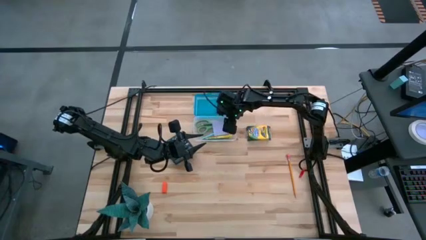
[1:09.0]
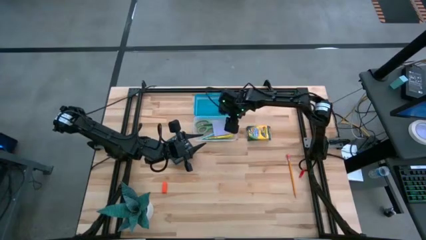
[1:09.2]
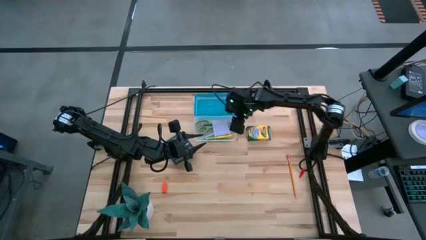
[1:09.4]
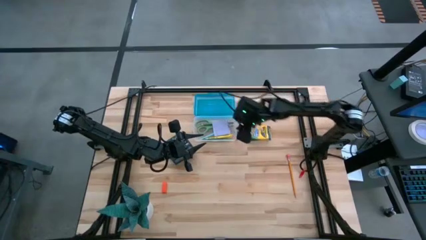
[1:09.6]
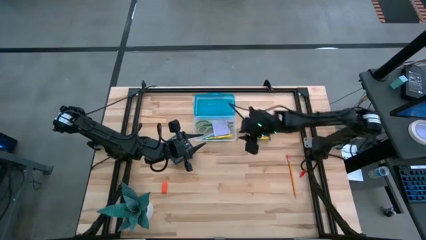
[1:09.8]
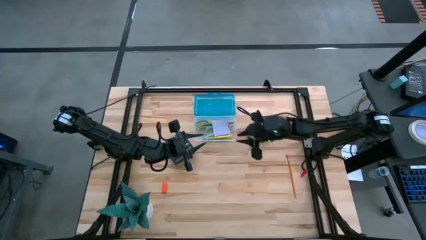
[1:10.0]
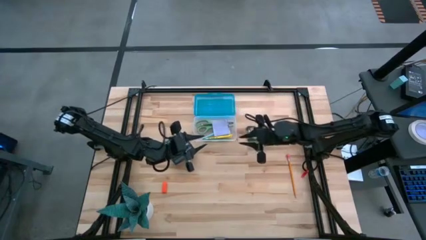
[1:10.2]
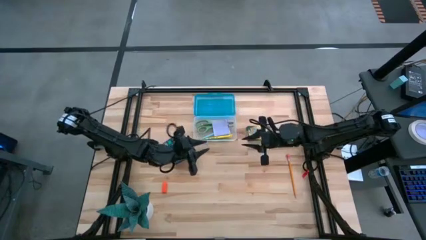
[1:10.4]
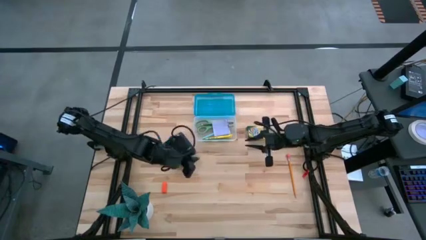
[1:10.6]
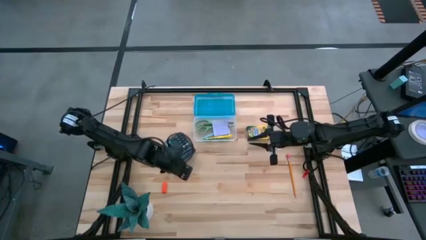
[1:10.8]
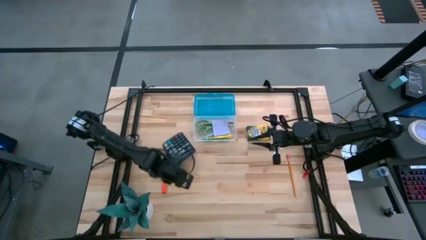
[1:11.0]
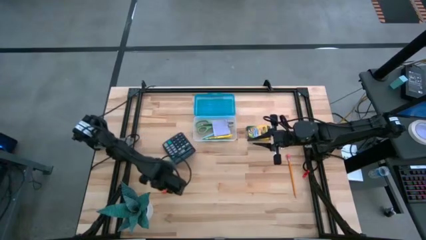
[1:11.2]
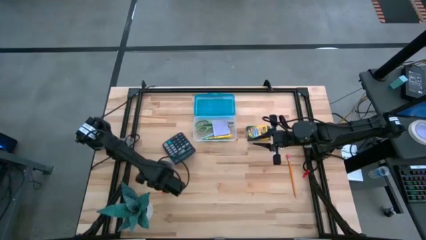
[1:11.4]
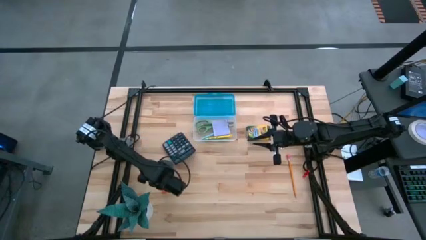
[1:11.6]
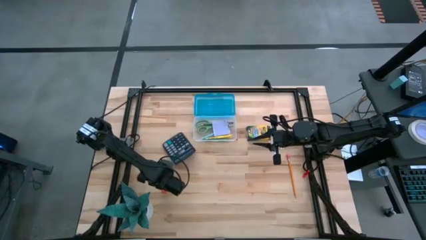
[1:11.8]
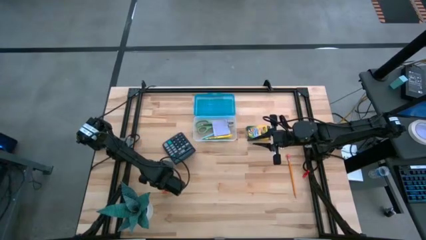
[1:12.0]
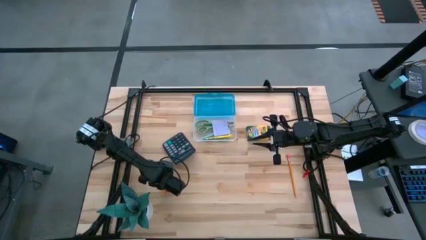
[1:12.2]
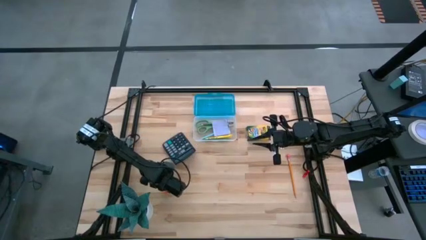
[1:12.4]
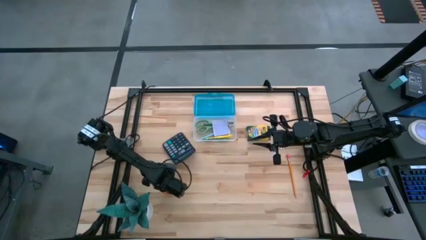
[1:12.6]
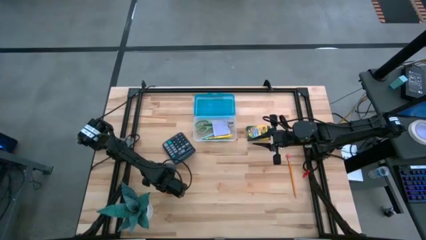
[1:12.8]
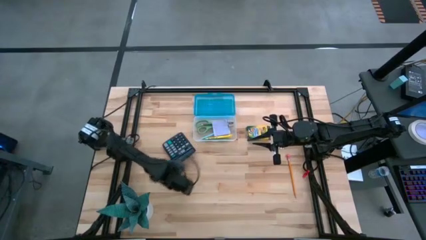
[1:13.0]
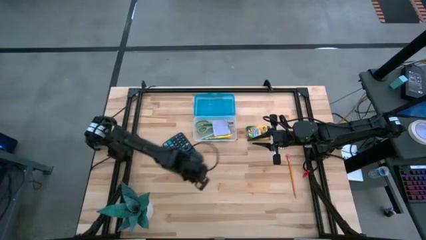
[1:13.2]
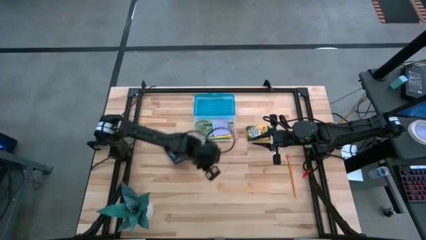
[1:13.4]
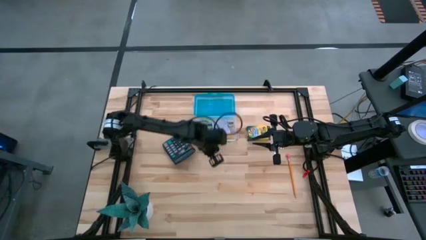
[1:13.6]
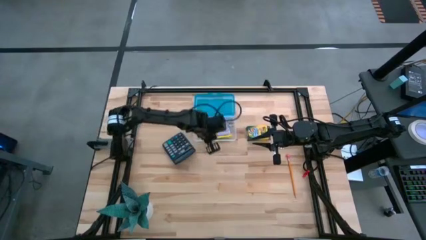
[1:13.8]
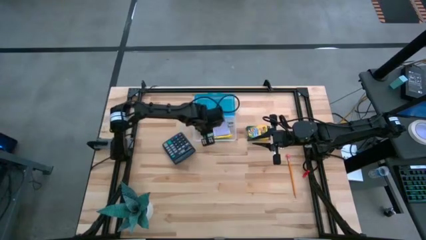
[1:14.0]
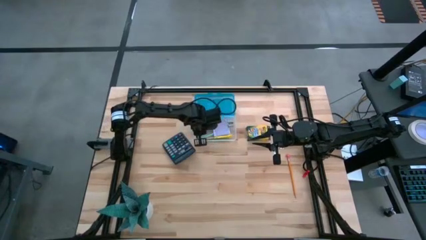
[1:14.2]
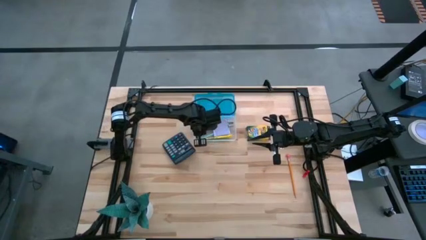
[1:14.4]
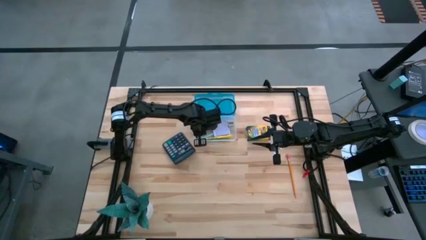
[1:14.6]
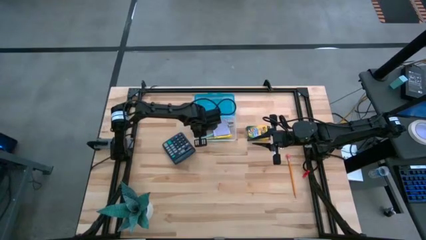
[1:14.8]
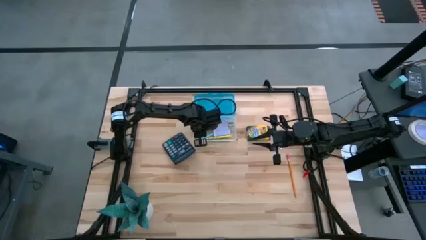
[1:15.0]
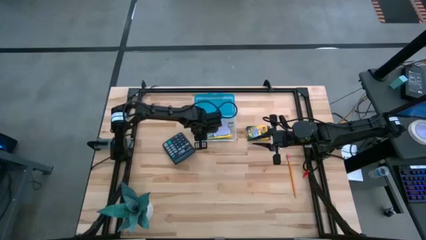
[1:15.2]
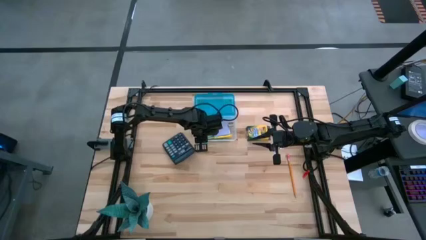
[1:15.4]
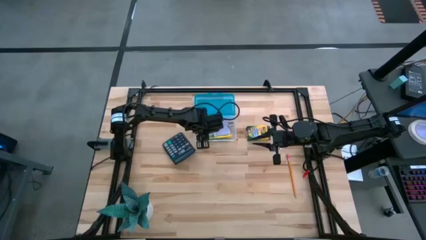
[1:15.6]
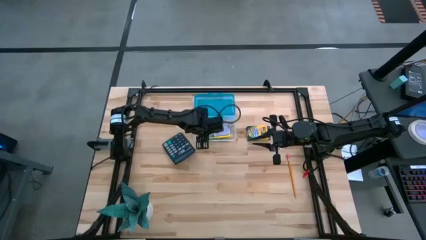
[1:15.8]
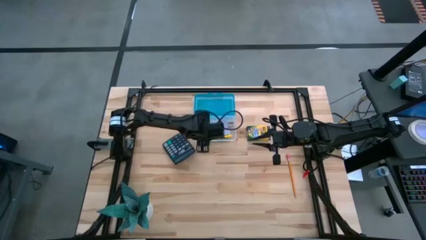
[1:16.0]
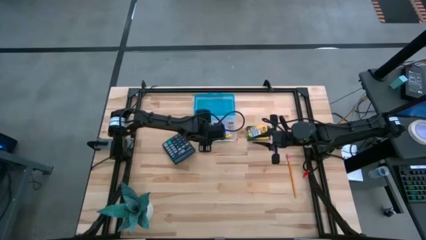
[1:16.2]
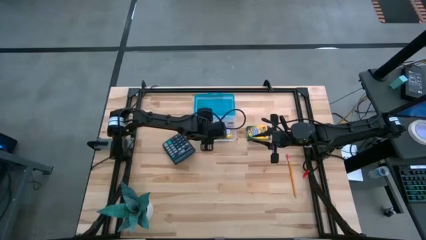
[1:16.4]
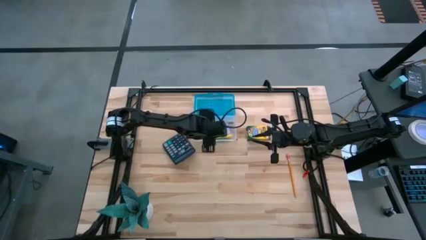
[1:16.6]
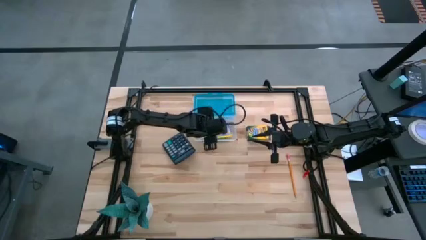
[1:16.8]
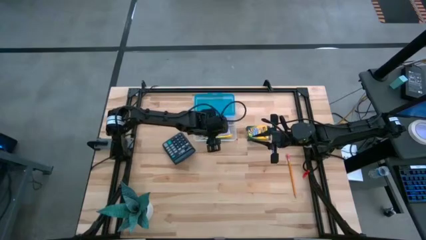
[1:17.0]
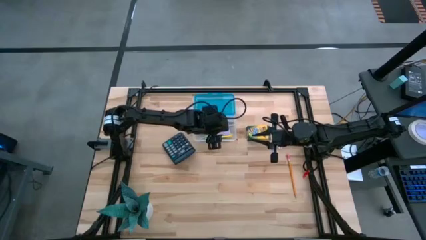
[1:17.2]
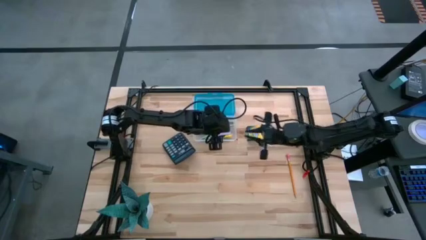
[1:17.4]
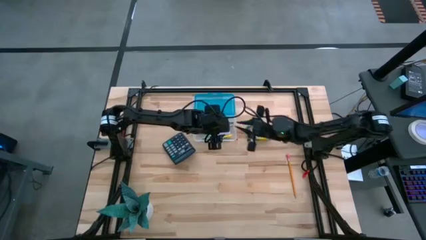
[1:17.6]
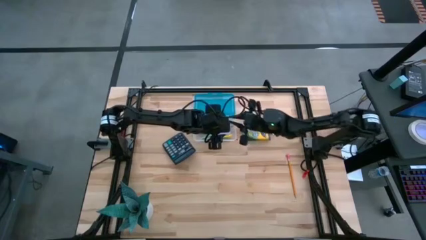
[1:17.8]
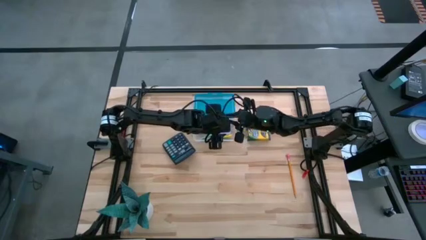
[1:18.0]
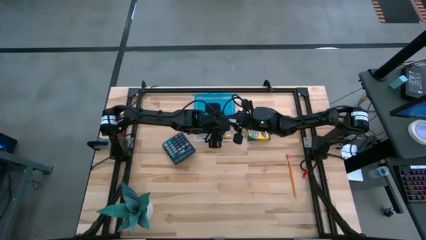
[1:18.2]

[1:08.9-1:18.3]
Task: Pack school essentials
Put the orange eraser into the blue supply box

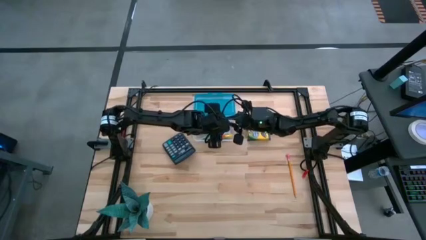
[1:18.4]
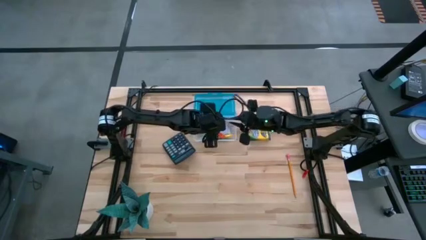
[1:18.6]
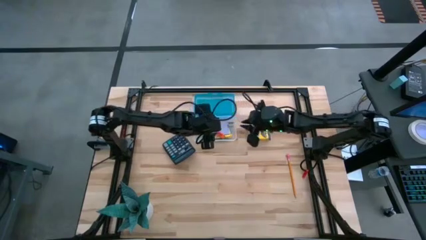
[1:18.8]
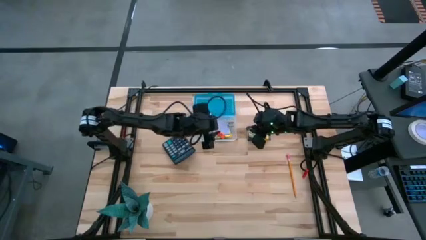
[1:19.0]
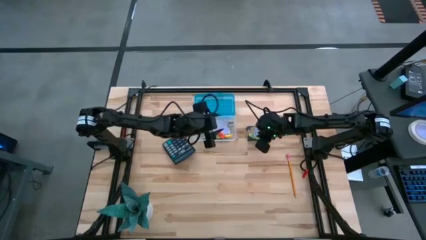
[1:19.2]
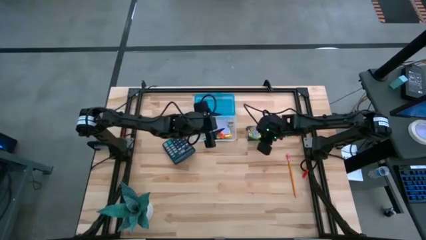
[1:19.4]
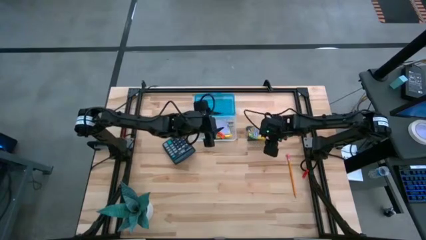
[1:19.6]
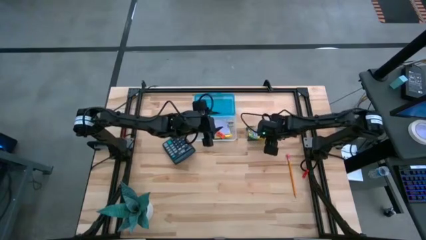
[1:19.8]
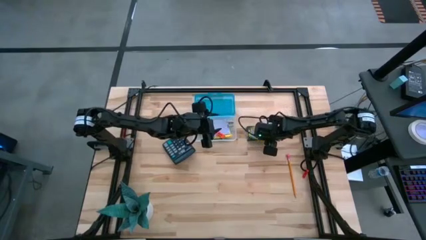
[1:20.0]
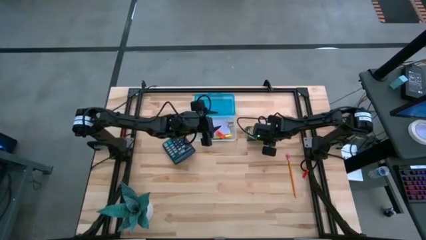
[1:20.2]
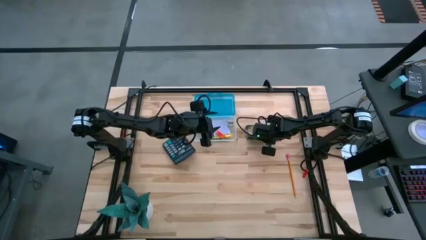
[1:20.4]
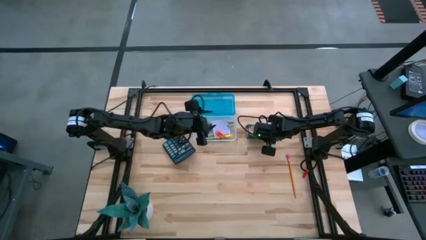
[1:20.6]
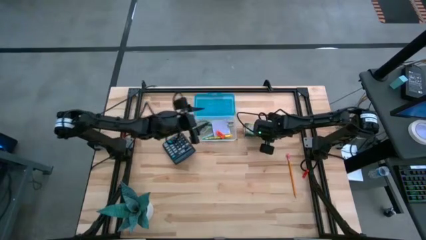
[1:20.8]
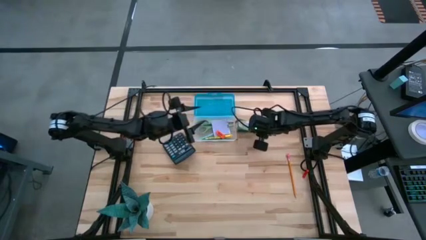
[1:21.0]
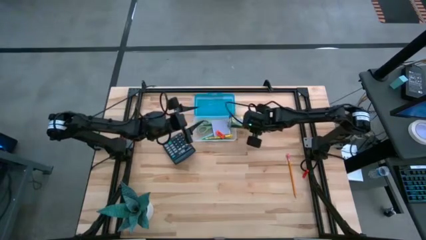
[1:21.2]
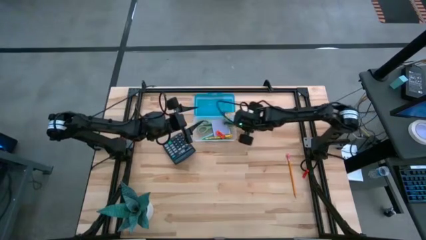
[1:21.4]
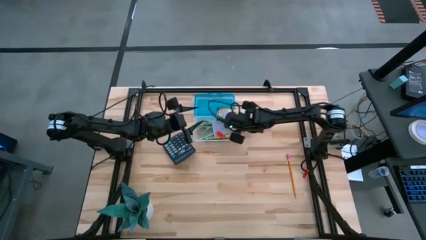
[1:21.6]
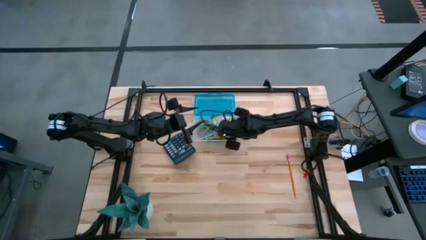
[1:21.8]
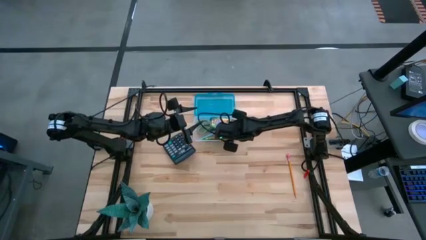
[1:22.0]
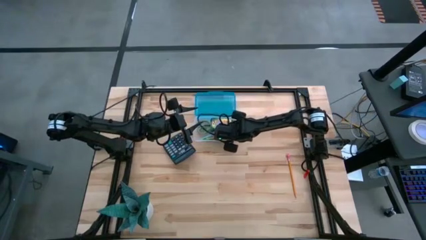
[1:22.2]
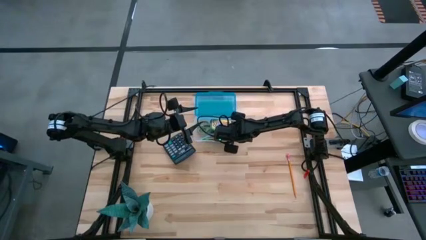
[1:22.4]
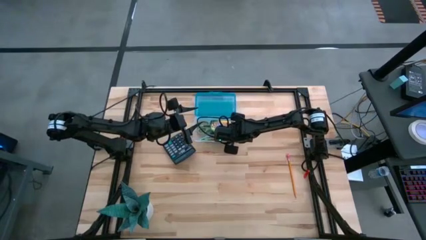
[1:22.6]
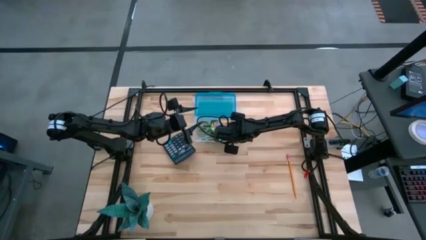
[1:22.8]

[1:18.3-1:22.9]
Put the yellow crayon box into the blue supply box

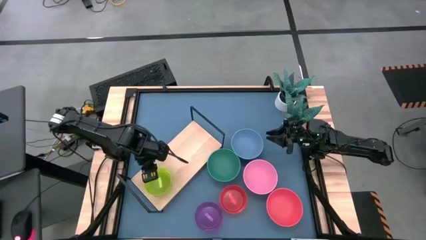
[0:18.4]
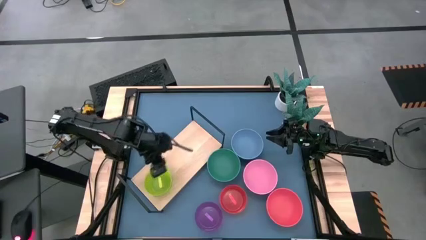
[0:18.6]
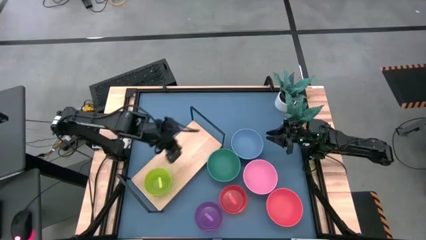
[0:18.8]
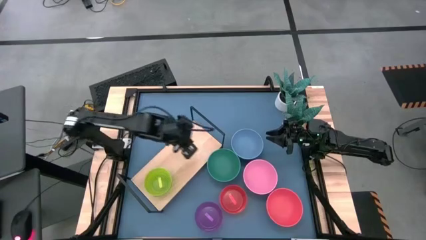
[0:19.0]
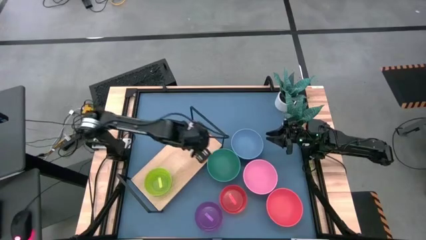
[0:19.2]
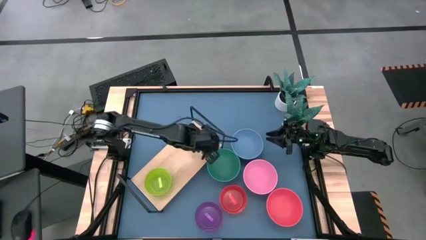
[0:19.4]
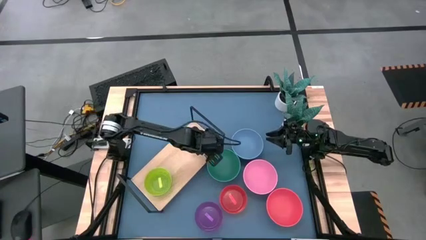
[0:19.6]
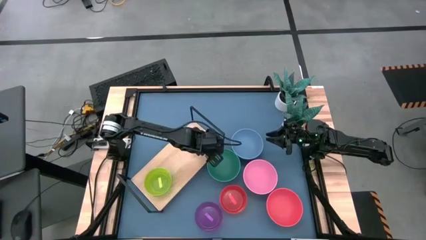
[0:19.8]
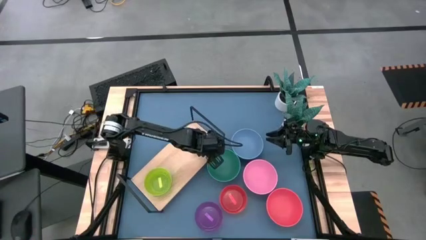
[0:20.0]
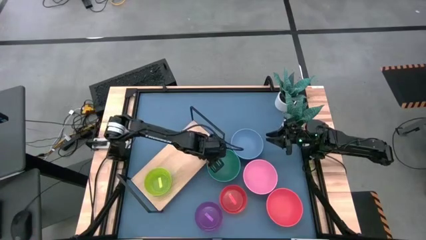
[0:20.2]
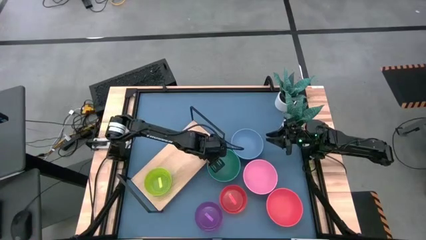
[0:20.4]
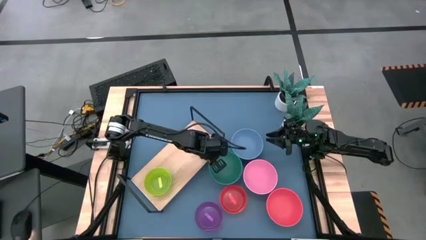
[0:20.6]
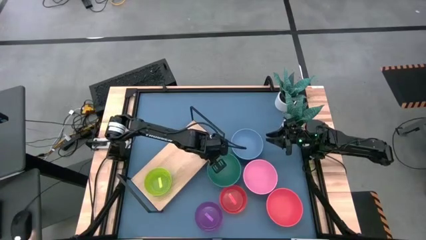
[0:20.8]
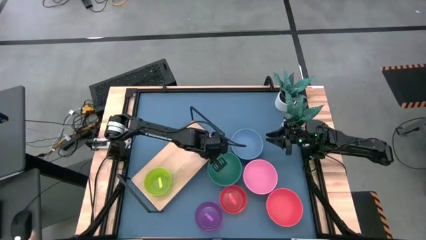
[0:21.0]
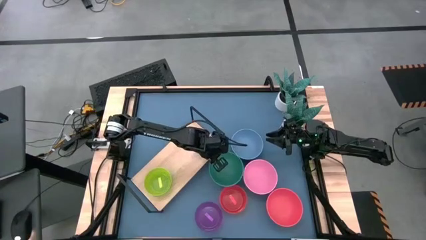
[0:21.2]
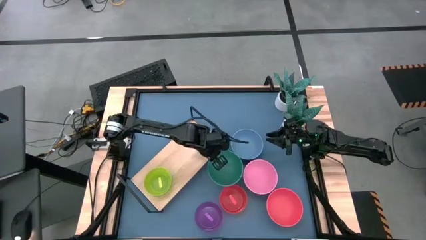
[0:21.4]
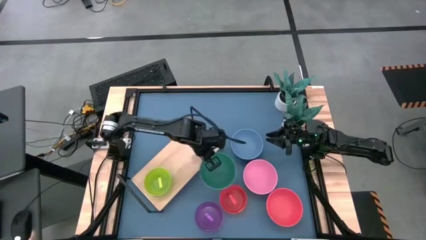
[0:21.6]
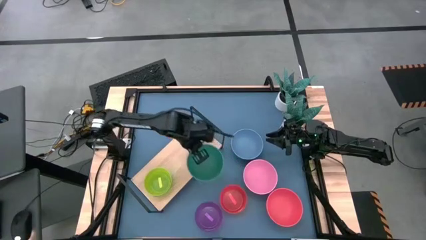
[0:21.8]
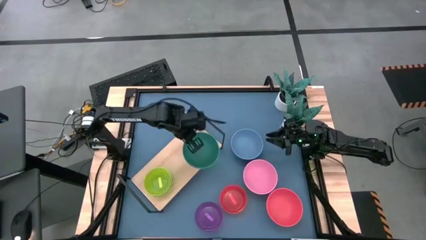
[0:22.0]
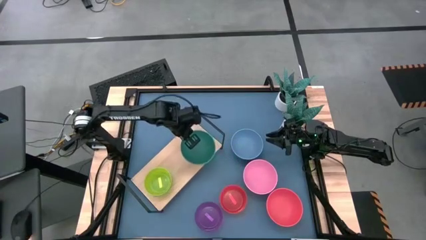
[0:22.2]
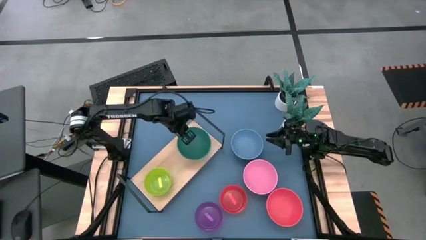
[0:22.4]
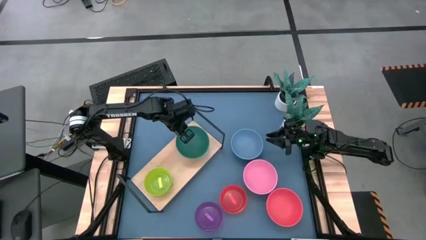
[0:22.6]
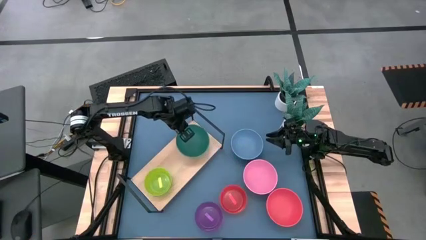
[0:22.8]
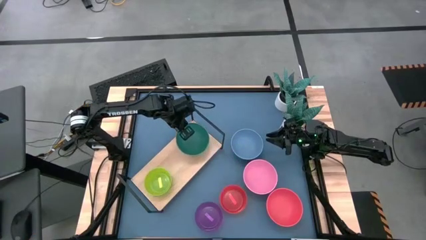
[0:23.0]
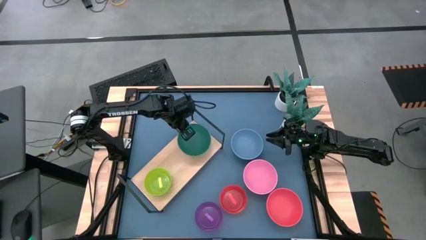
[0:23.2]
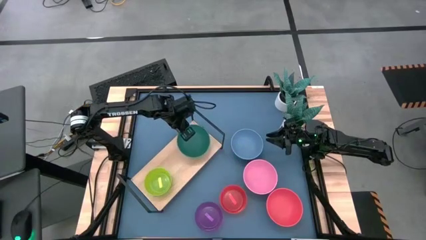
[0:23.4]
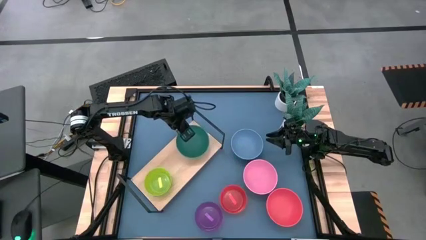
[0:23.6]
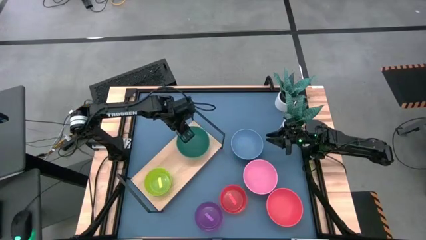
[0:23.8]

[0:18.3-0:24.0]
Task: Place and stack bowls onto a shelf
Put the large green bowl on the shelf
